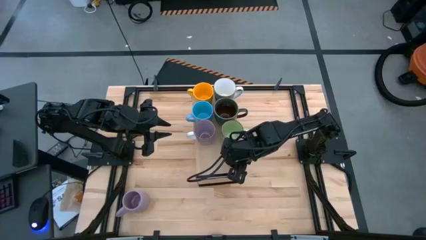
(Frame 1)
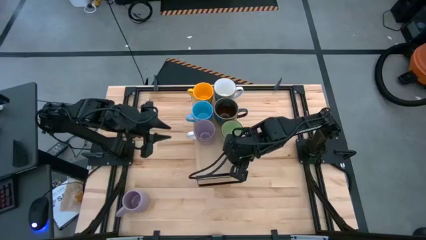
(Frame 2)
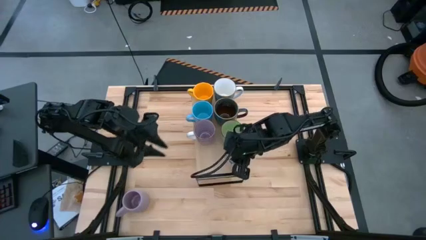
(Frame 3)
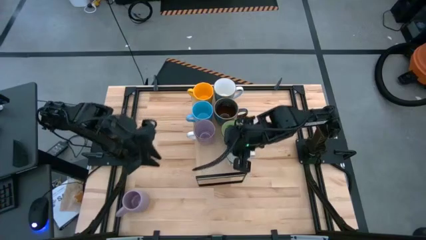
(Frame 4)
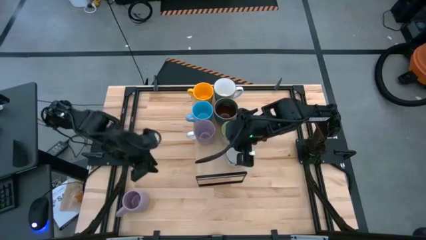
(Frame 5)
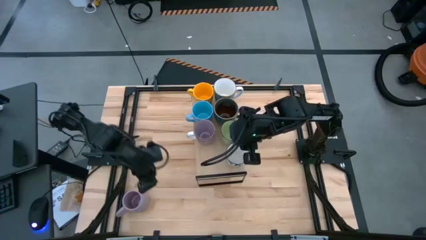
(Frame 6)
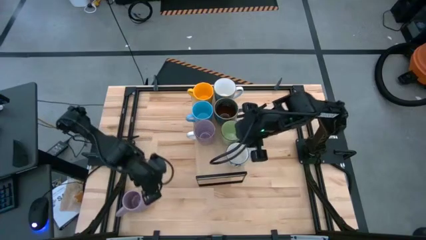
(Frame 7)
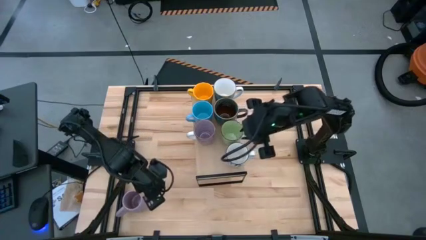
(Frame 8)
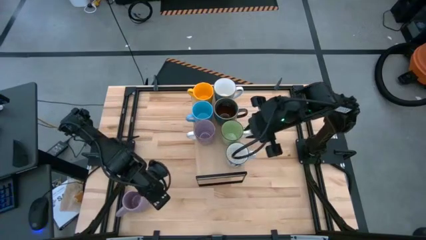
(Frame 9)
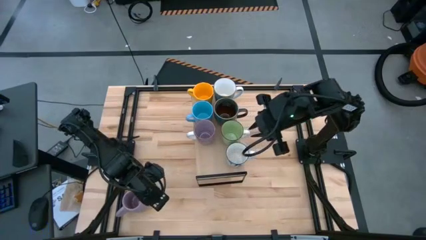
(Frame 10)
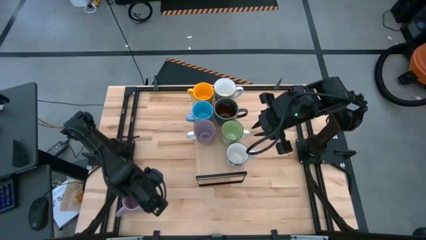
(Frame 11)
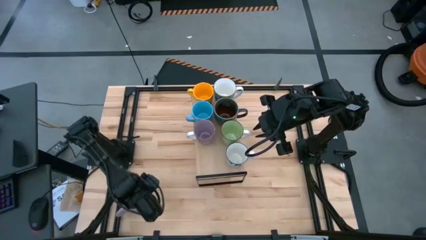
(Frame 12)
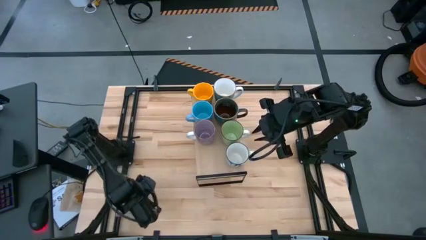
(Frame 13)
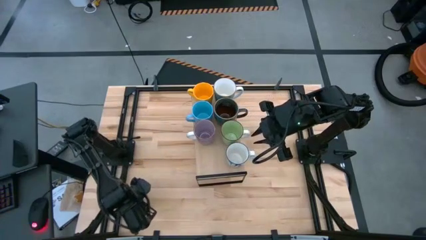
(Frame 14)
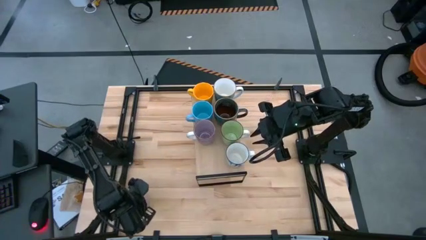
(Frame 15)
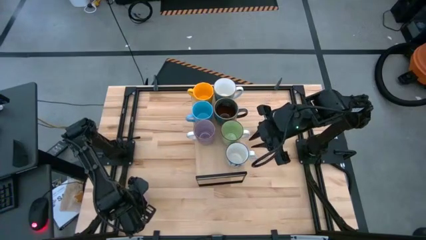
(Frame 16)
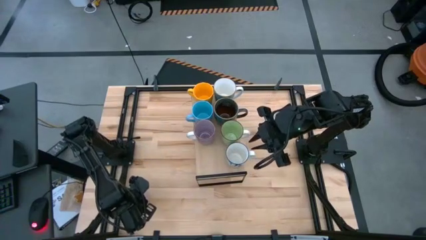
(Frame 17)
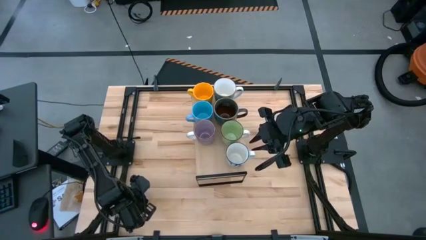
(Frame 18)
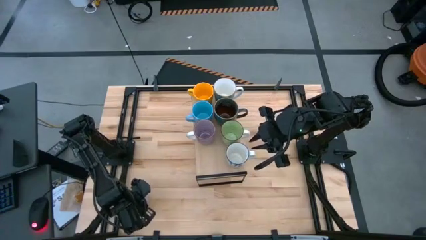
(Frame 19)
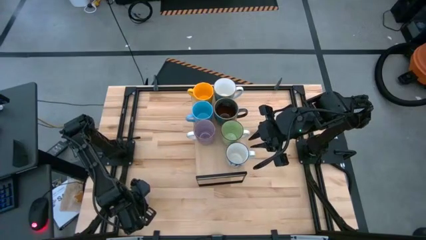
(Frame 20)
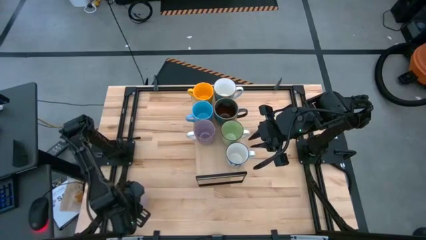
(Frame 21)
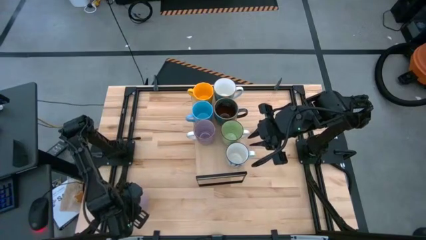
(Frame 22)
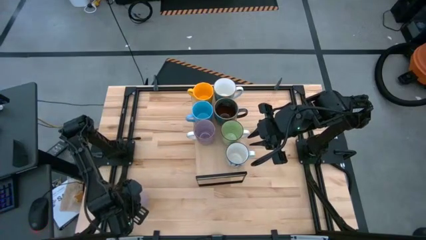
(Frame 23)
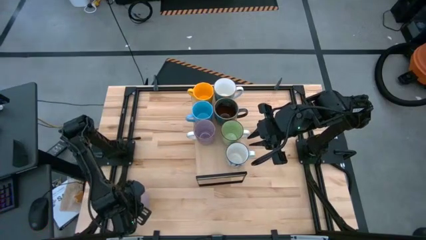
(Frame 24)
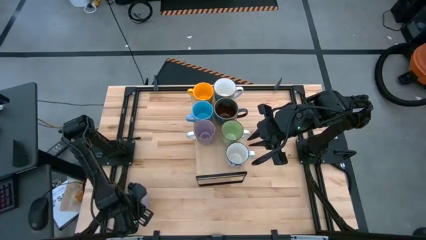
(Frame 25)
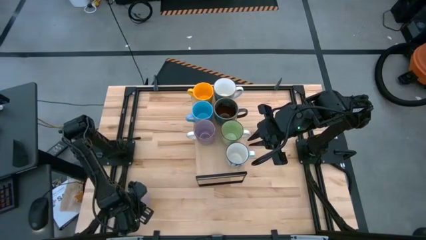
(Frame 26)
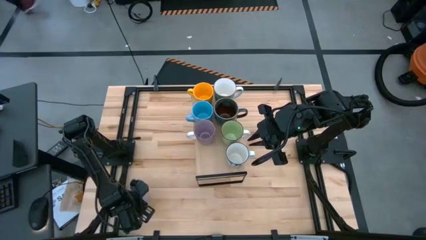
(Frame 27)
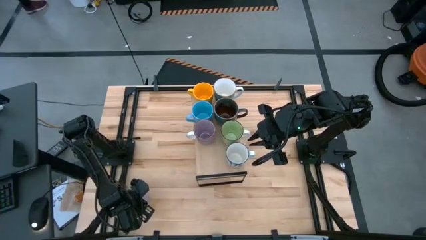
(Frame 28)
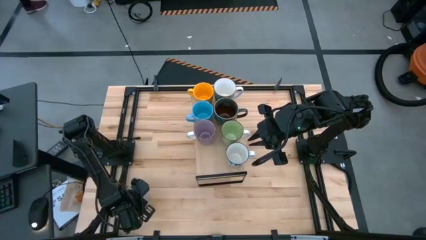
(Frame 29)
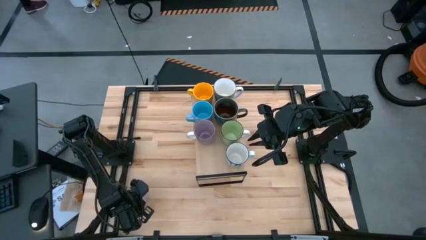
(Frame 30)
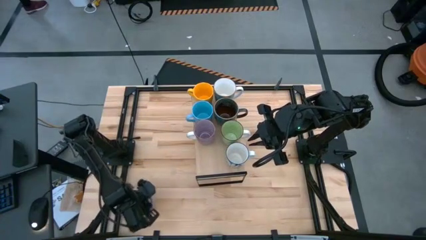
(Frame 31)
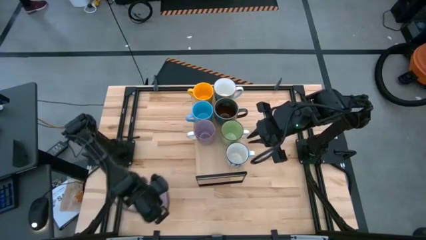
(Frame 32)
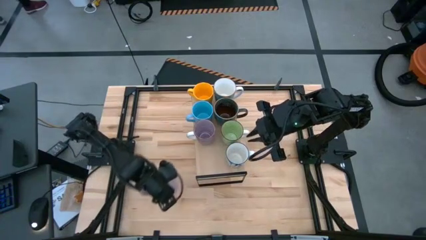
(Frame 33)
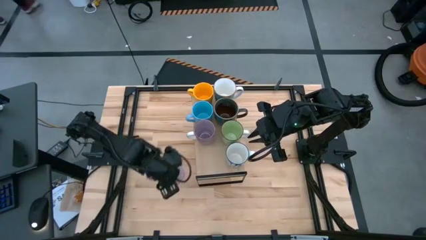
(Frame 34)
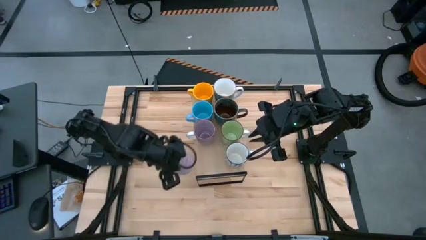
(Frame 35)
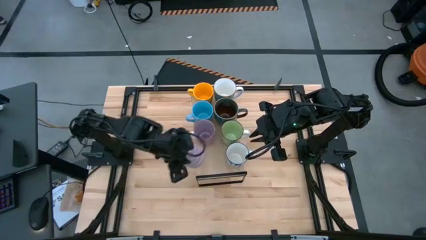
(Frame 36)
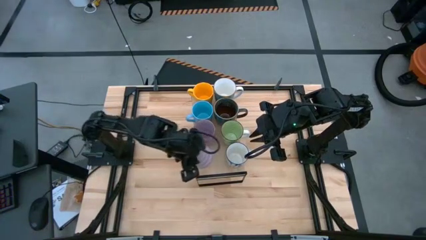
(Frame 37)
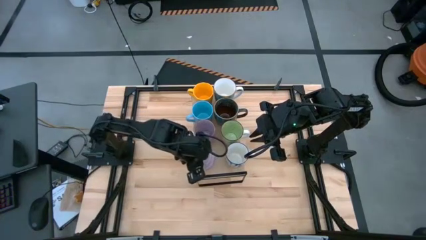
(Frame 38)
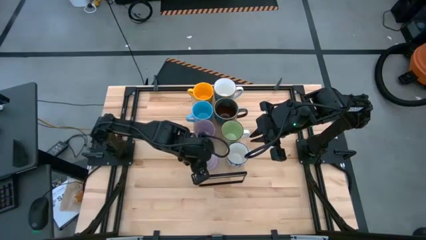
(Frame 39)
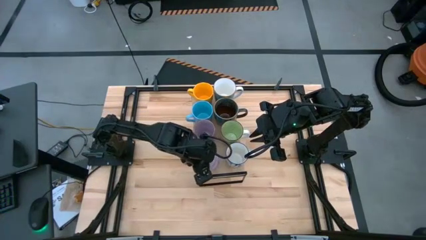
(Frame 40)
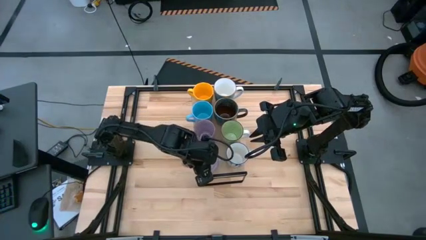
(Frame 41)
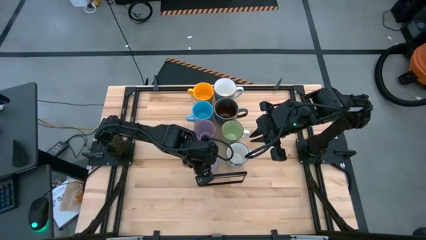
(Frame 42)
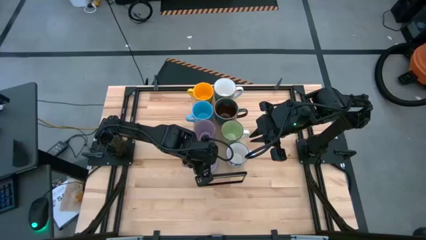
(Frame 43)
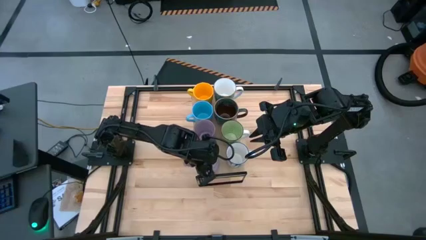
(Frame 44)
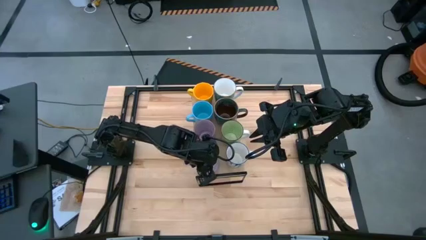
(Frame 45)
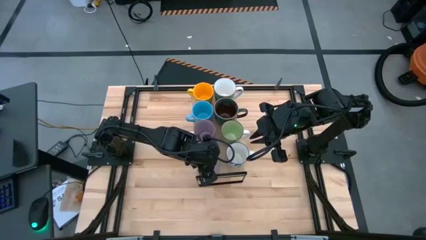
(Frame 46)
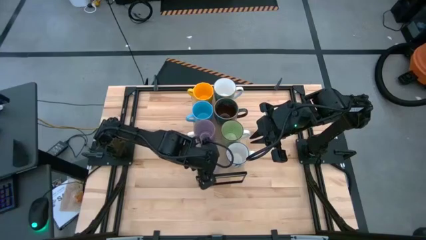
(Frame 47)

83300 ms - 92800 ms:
Task: Place coffee mugs
Put the violet mug on the shelf

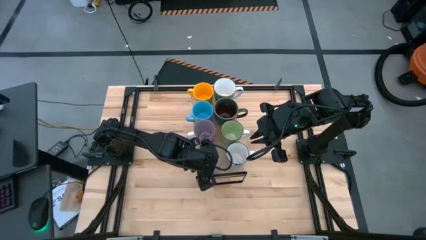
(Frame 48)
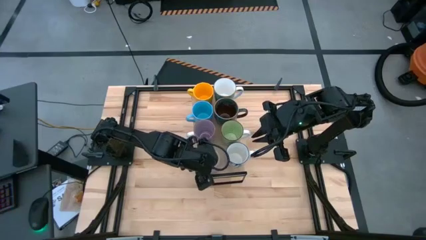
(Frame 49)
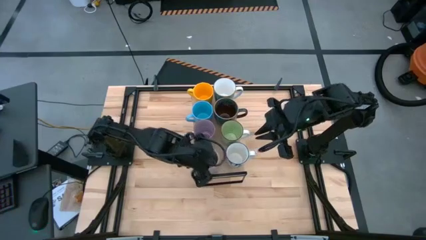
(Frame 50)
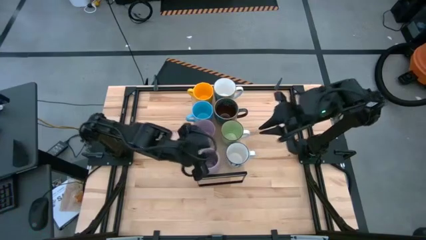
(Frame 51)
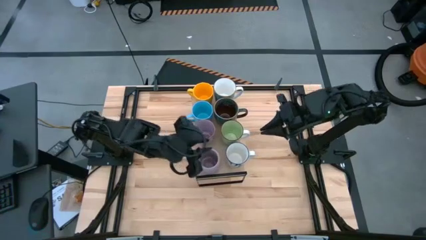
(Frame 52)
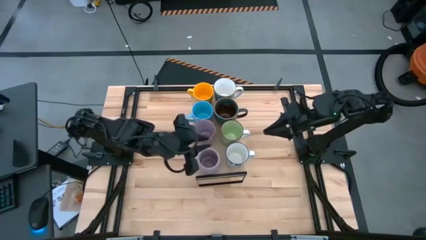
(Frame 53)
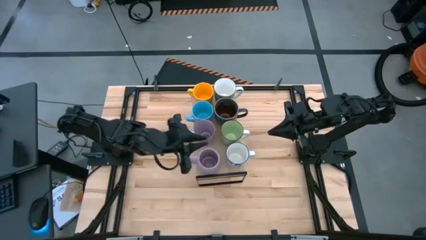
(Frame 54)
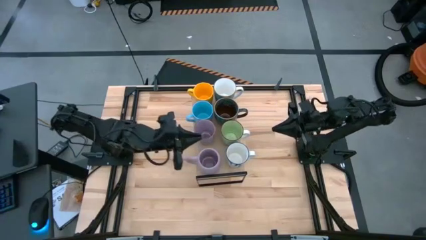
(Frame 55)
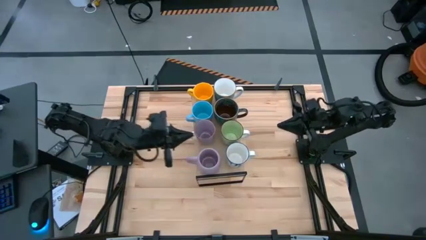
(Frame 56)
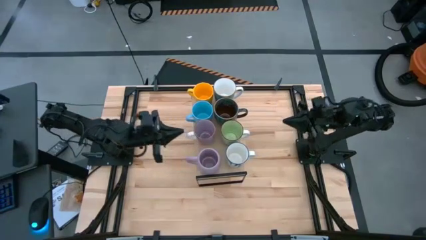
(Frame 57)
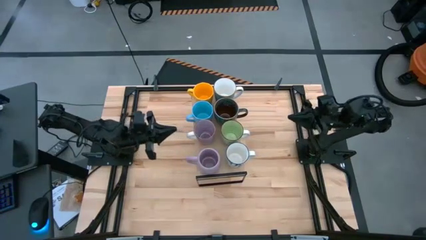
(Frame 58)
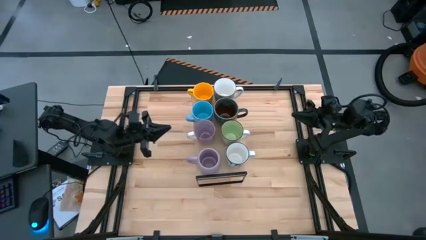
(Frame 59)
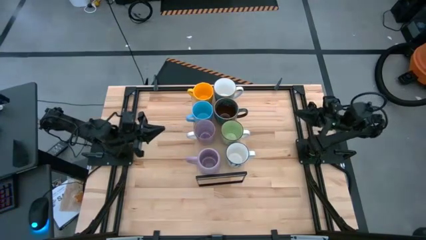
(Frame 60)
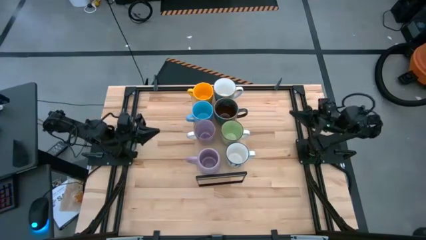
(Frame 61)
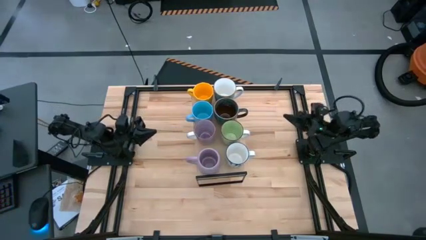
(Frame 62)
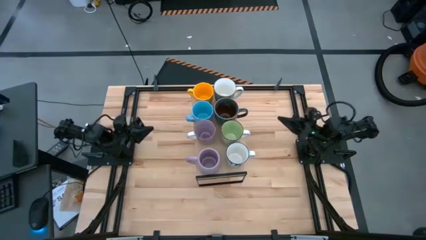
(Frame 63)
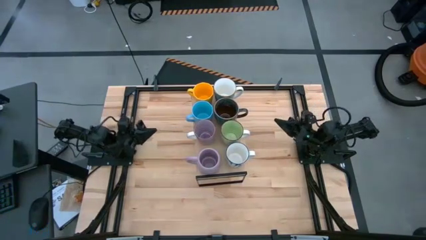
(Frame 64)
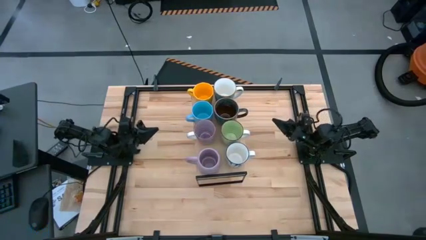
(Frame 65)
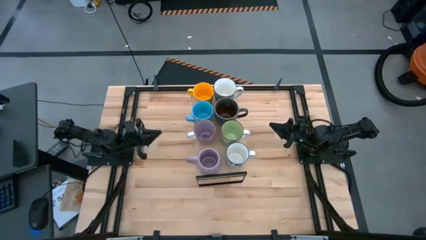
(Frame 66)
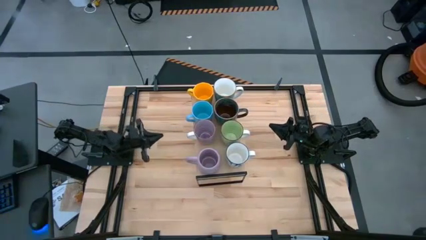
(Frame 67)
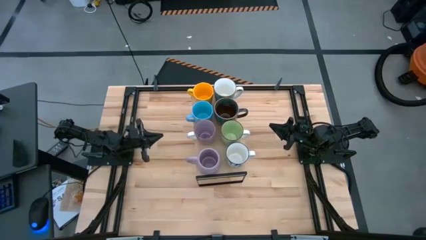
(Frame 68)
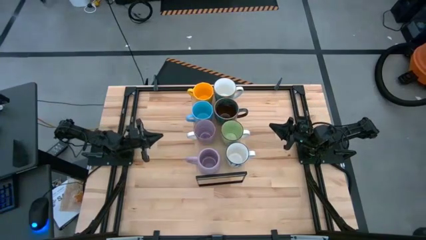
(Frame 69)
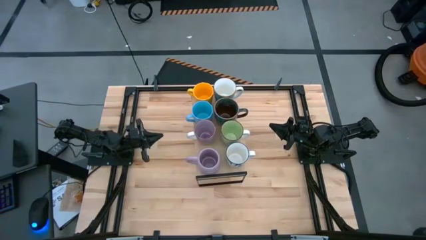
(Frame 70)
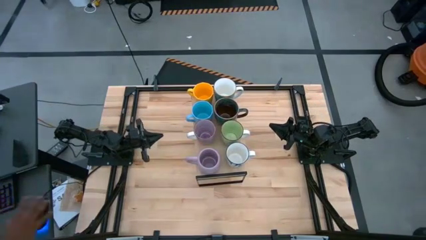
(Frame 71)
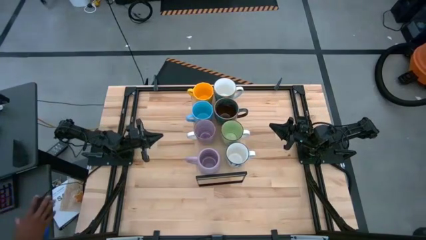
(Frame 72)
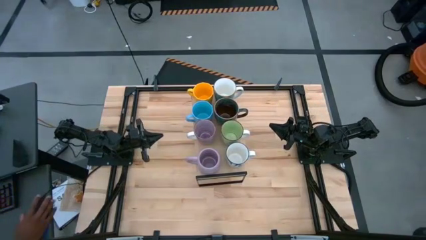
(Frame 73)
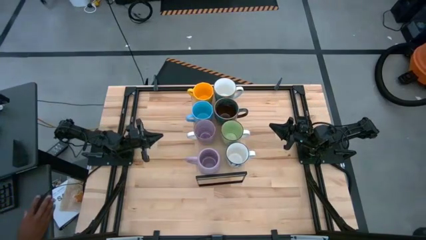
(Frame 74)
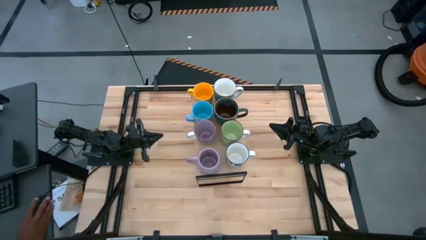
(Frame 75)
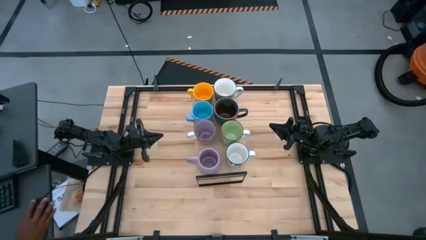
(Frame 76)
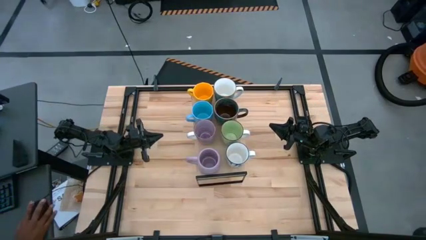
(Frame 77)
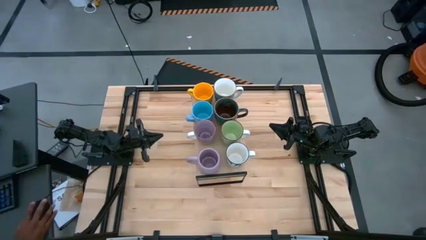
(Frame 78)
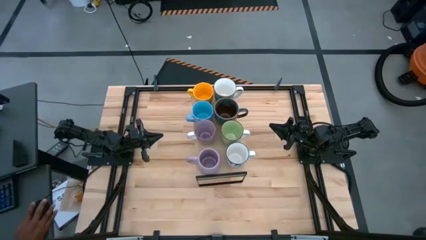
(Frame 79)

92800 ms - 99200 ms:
Return to Home Position
